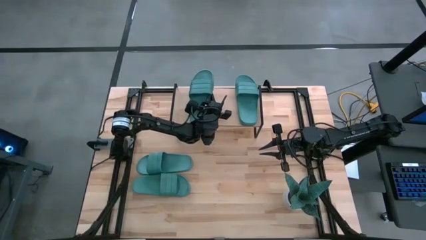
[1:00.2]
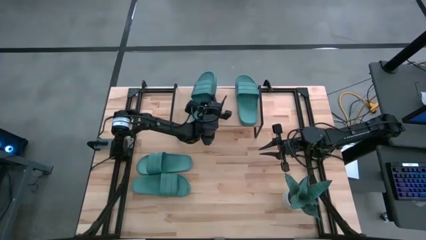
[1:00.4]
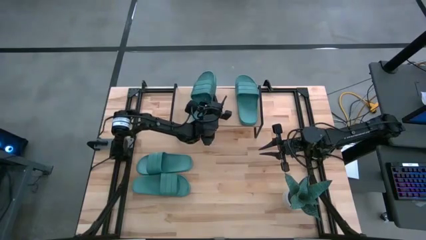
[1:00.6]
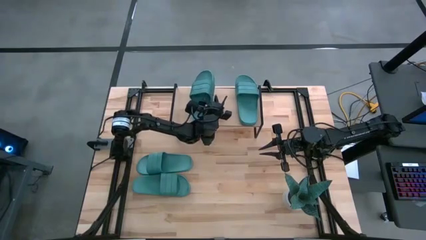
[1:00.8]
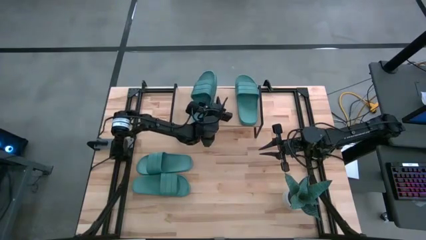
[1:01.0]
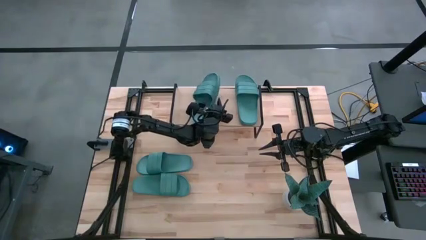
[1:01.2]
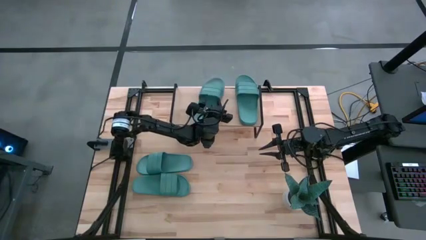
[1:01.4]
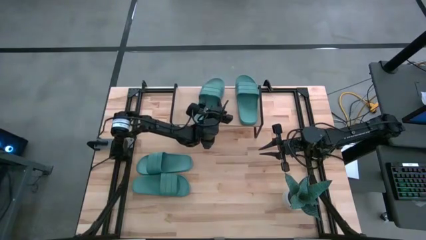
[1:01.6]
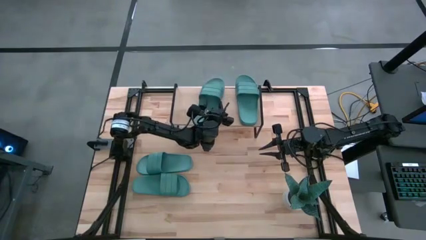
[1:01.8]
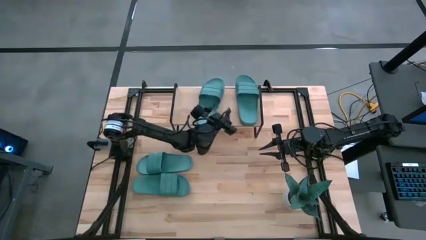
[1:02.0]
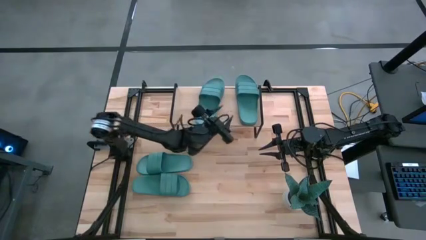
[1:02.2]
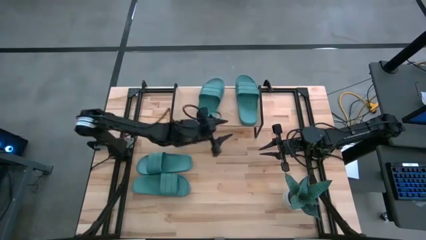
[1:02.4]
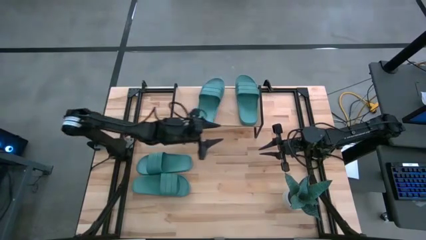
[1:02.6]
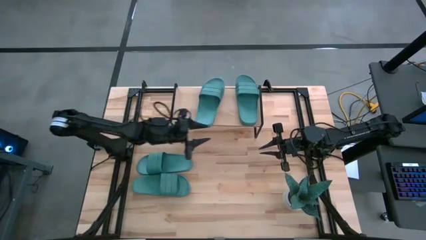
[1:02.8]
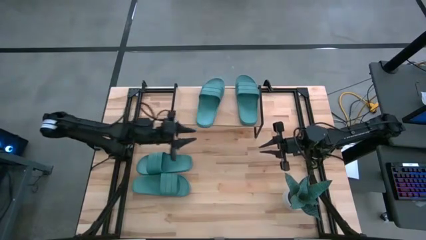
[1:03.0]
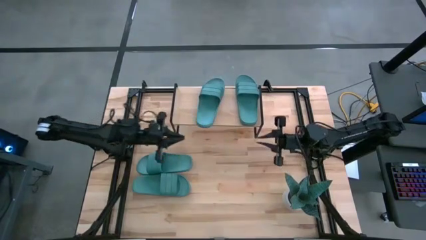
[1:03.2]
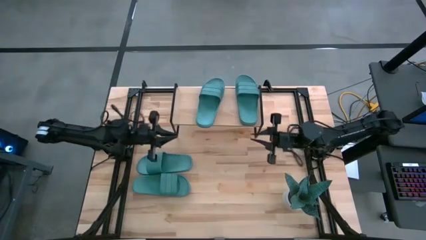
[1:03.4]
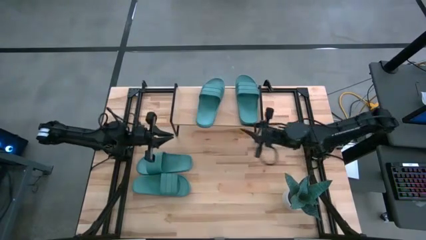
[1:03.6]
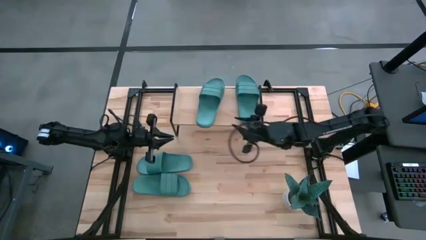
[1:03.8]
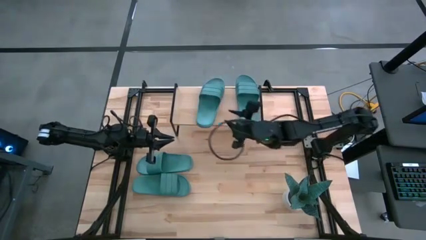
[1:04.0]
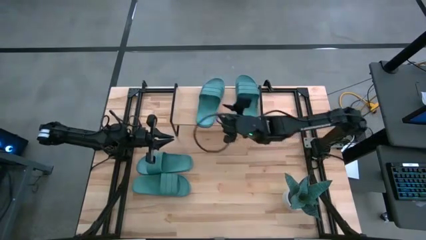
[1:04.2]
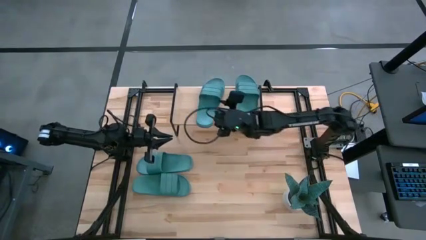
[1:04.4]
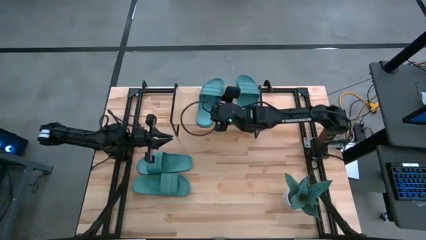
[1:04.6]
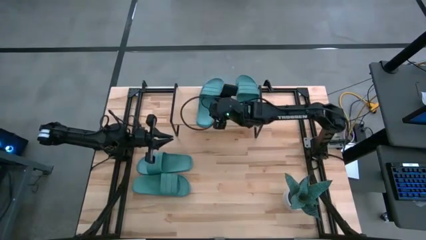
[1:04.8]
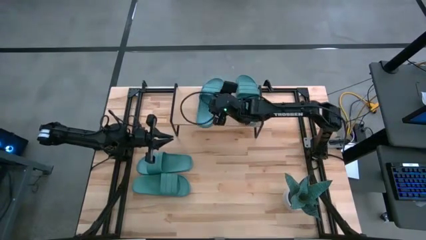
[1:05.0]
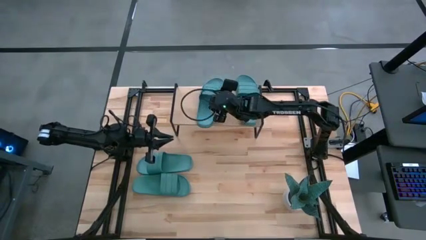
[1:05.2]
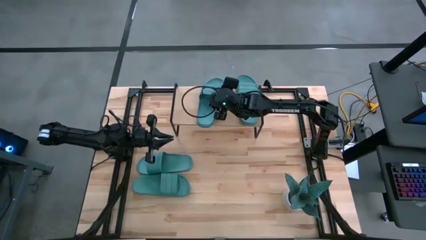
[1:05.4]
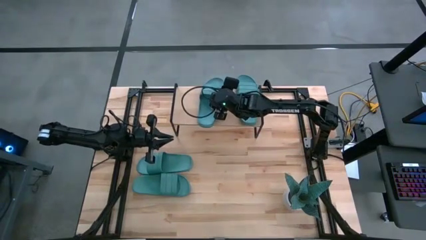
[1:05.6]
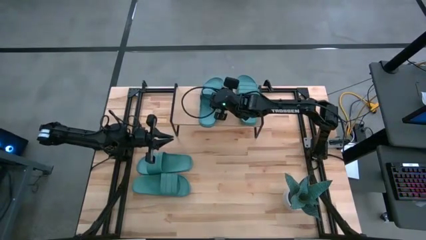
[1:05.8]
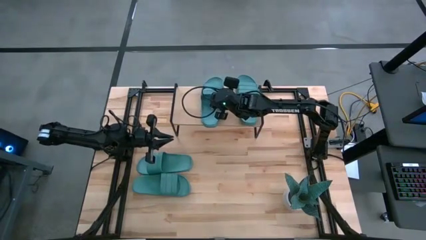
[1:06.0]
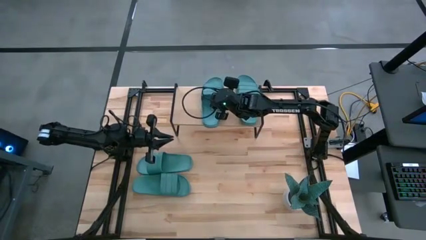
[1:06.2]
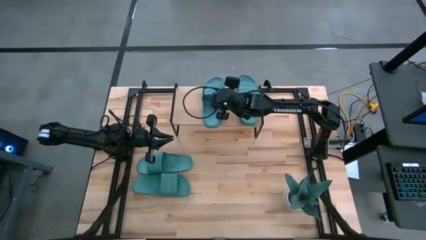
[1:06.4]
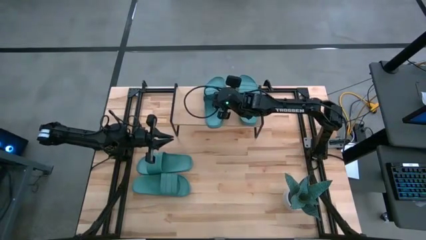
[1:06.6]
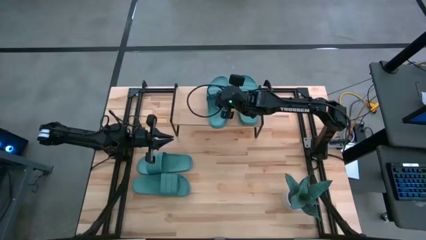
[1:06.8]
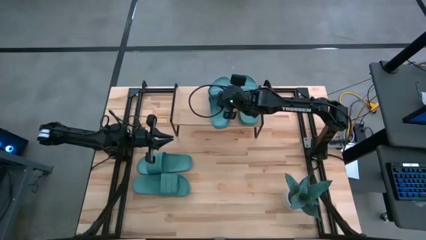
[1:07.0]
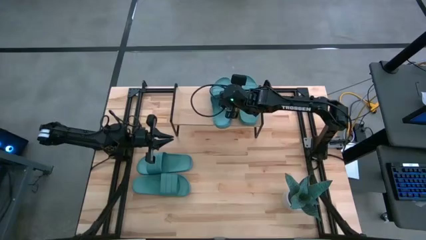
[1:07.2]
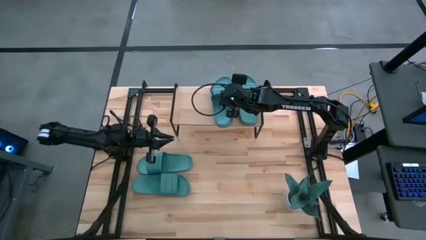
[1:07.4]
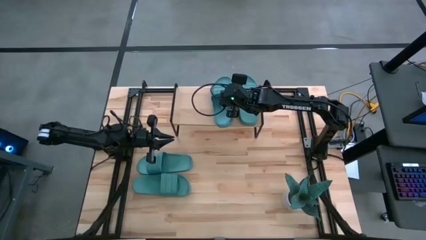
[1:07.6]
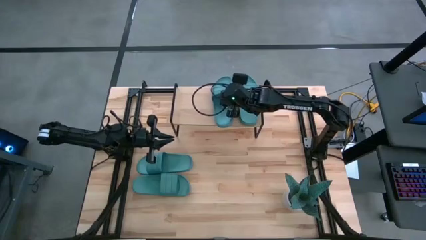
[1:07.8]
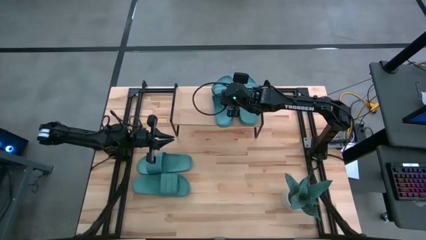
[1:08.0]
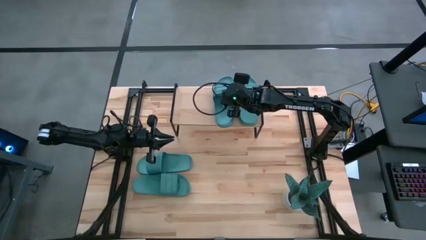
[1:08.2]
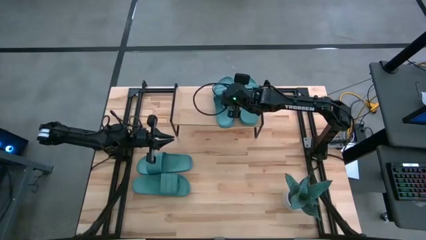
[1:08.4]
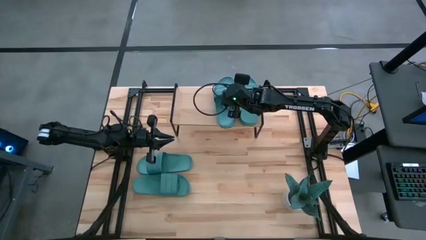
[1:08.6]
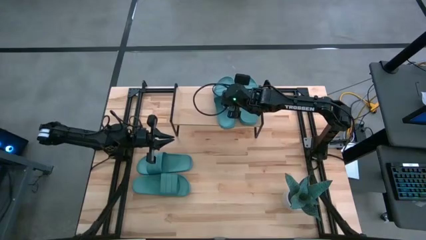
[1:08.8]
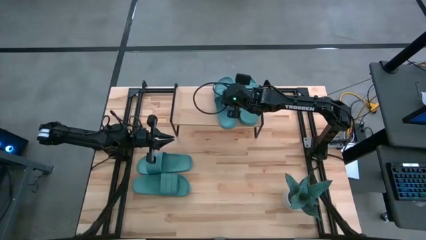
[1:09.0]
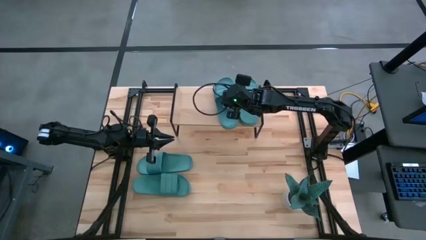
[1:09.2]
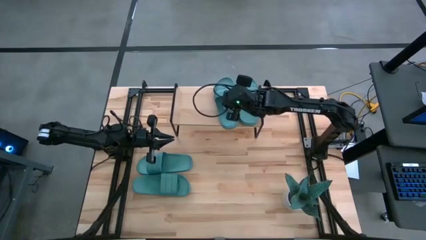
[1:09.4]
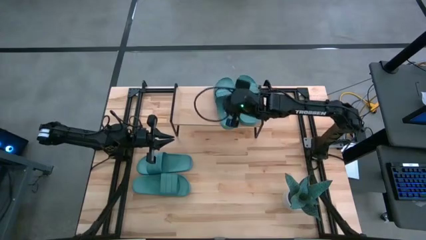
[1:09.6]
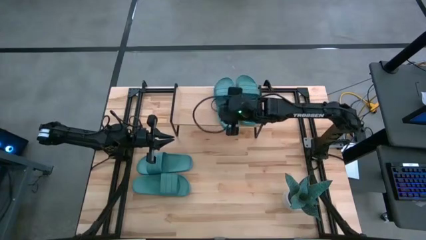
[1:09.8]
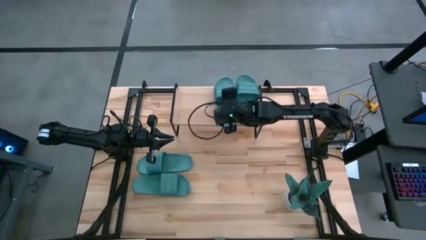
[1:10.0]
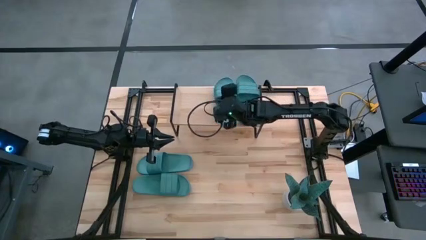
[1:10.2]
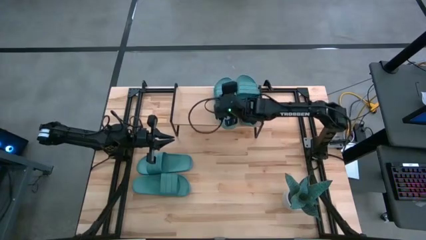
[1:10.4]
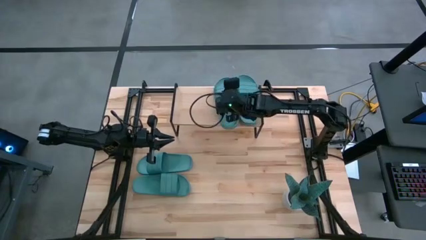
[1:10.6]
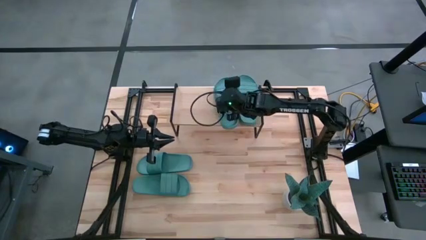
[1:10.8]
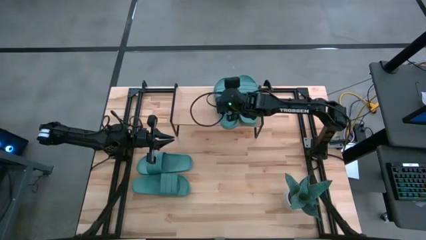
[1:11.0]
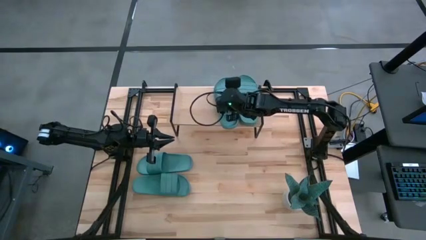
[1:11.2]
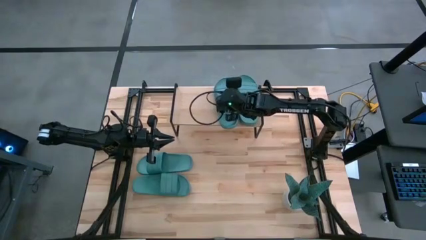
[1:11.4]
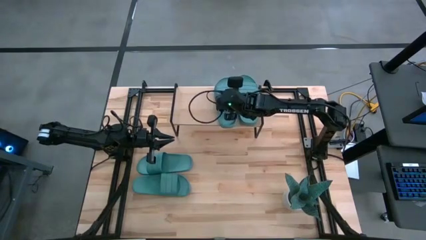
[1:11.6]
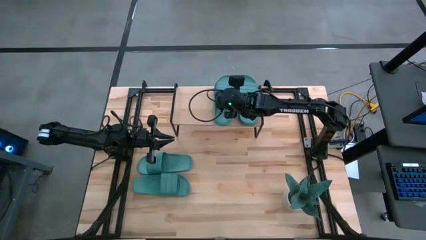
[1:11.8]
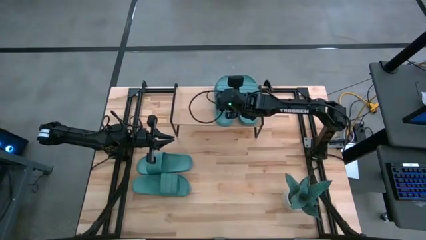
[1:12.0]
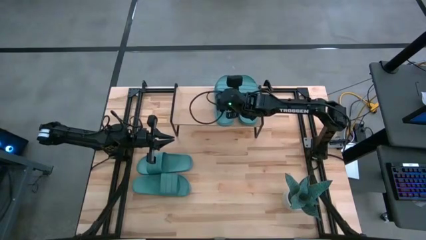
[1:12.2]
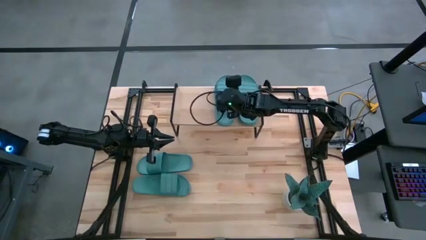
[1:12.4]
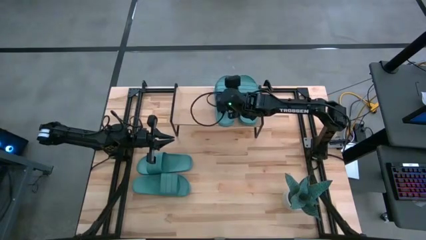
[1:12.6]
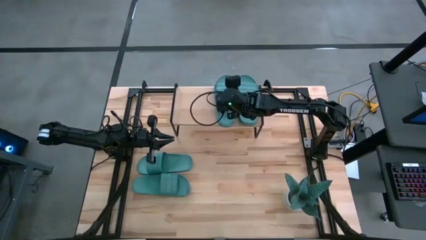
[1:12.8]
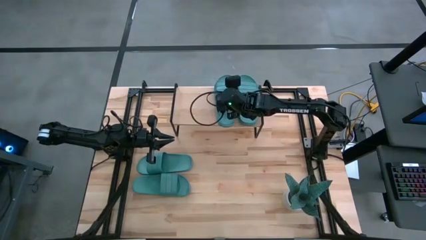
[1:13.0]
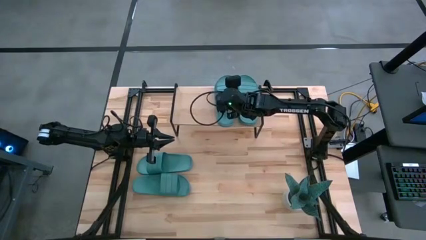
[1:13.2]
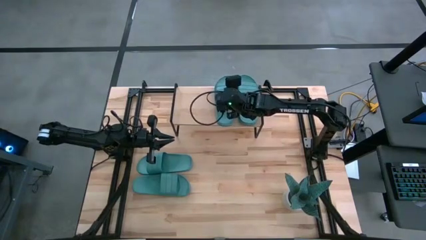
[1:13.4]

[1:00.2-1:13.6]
Task: Pick and place slides into the shelf
Put the green slides on the shelf

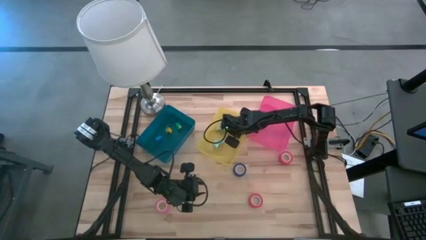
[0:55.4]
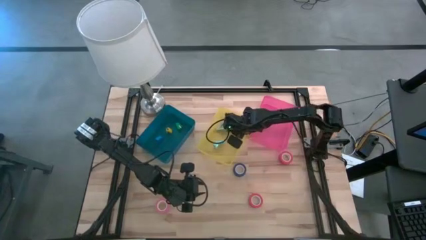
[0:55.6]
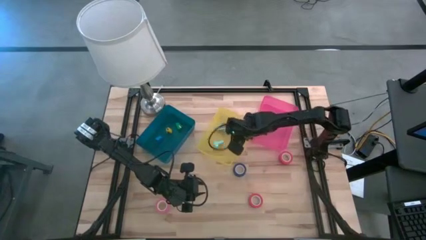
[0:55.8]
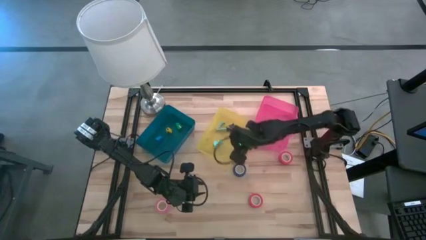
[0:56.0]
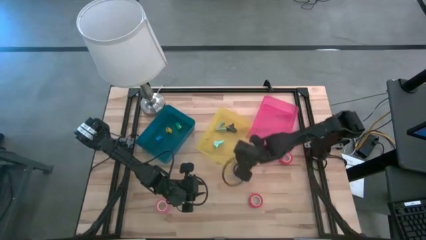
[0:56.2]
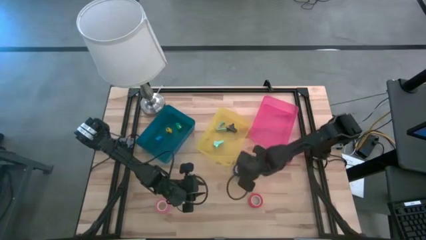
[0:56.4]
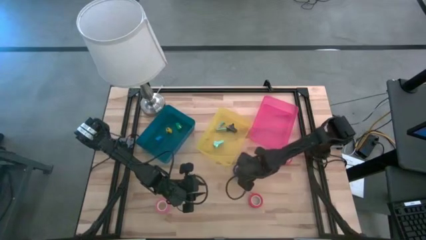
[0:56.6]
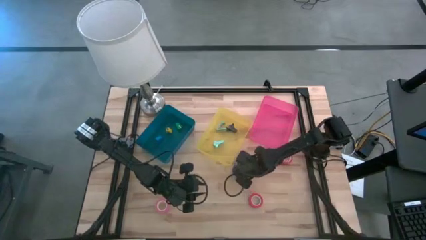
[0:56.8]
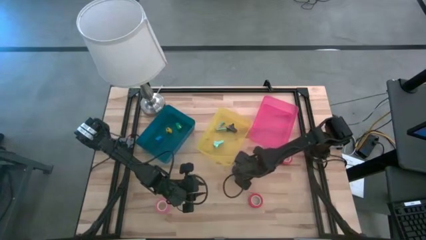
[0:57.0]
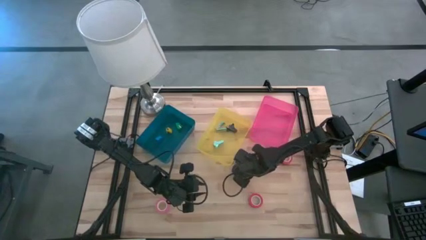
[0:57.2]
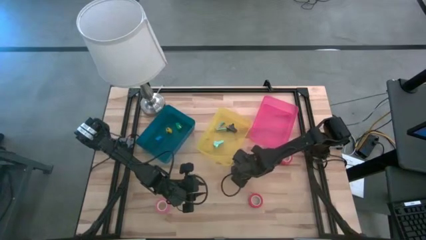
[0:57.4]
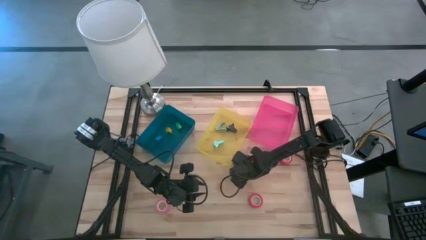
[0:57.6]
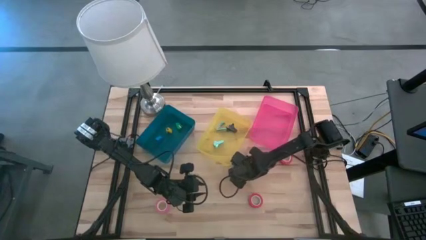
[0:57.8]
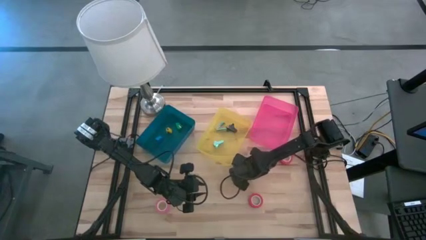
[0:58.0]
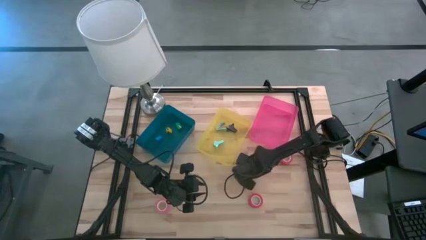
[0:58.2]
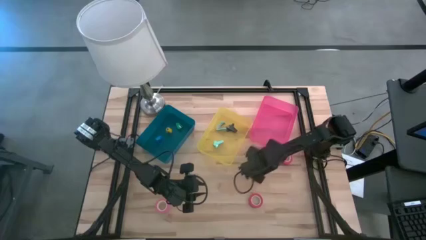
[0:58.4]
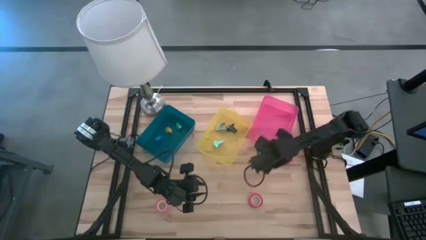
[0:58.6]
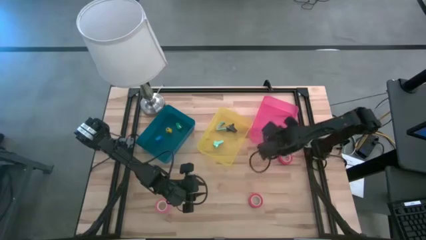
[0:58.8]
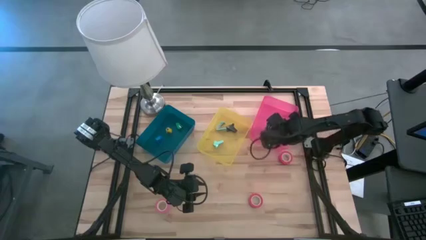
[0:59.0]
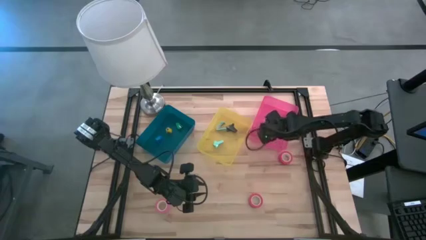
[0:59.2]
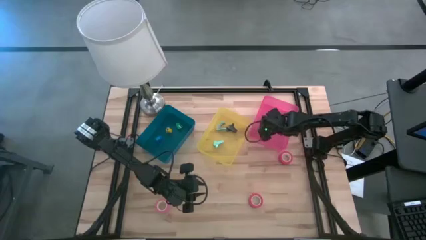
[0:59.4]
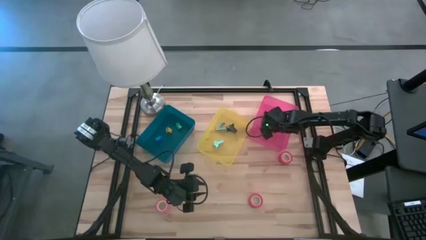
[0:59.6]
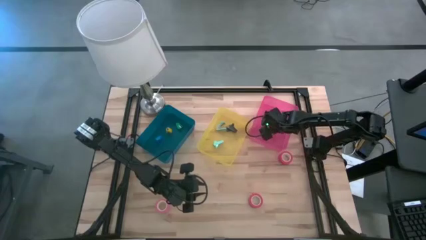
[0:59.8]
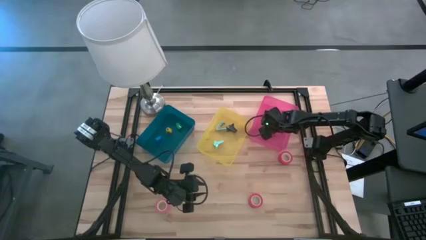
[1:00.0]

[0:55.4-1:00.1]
Task: Pick and place Stapler, Stapler remover, tape
Put the blue tape into the pink bin
